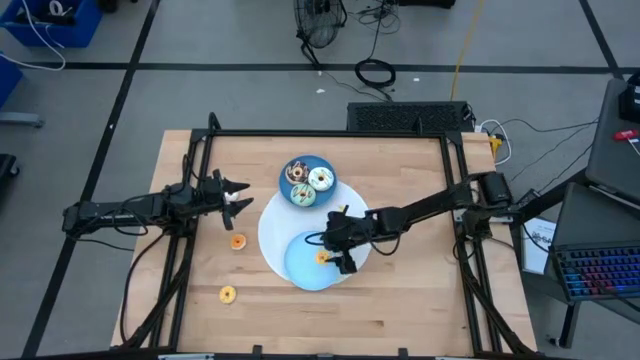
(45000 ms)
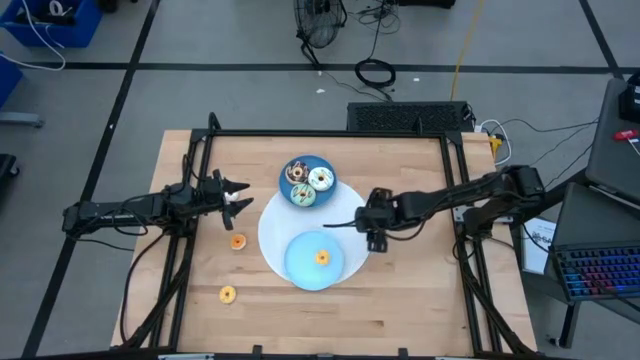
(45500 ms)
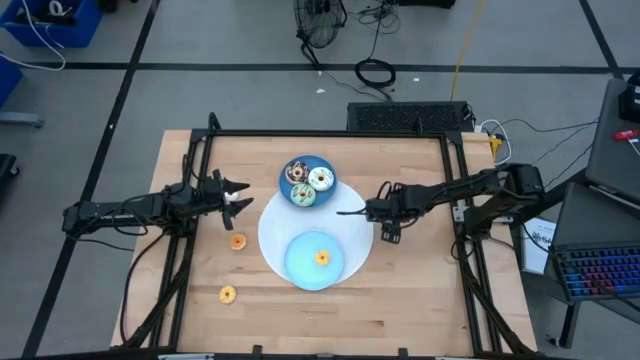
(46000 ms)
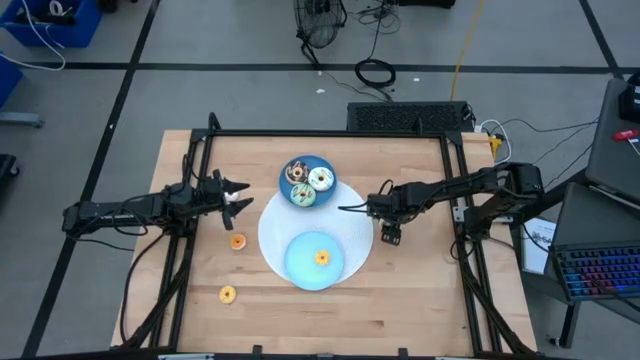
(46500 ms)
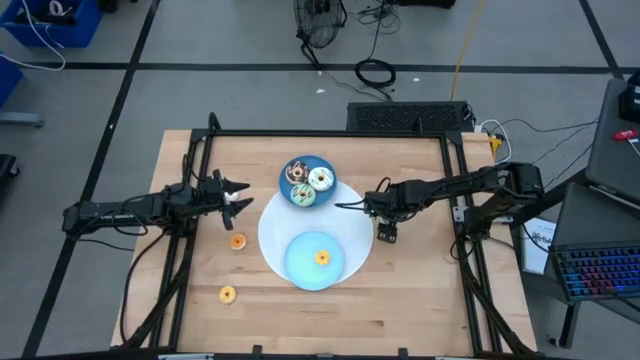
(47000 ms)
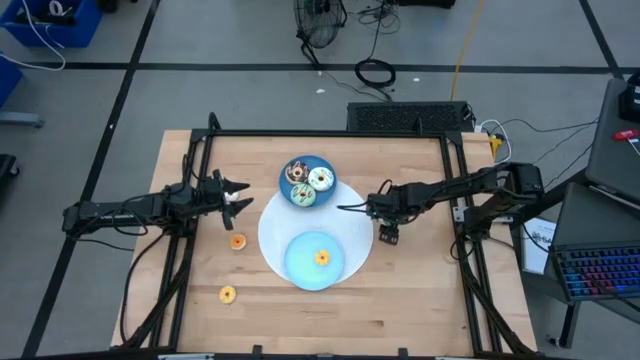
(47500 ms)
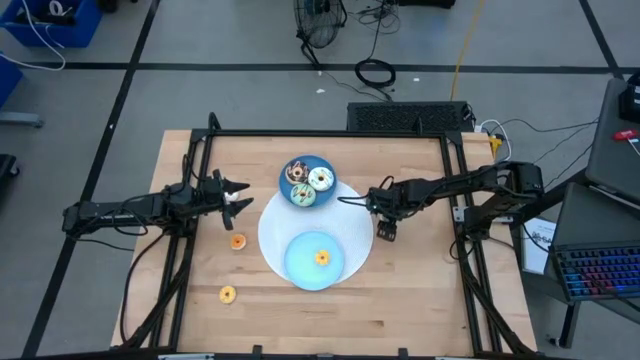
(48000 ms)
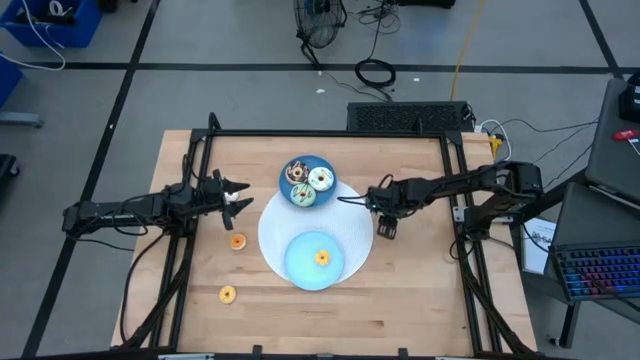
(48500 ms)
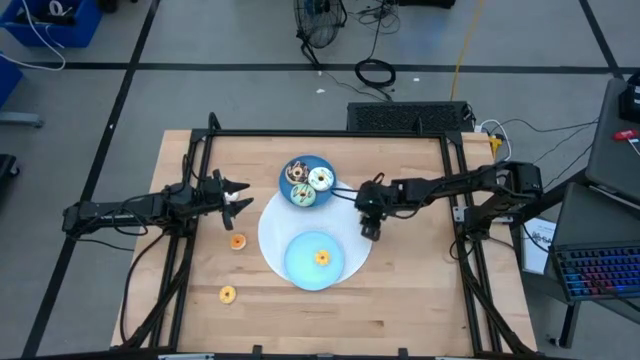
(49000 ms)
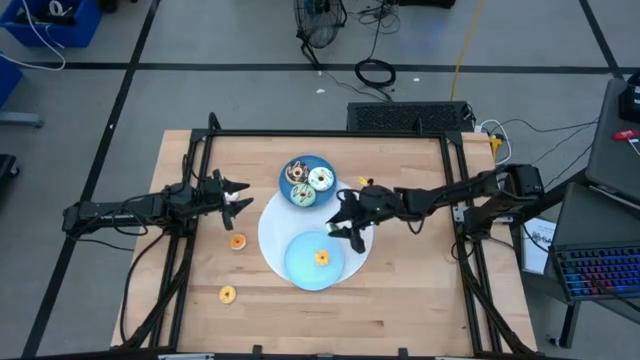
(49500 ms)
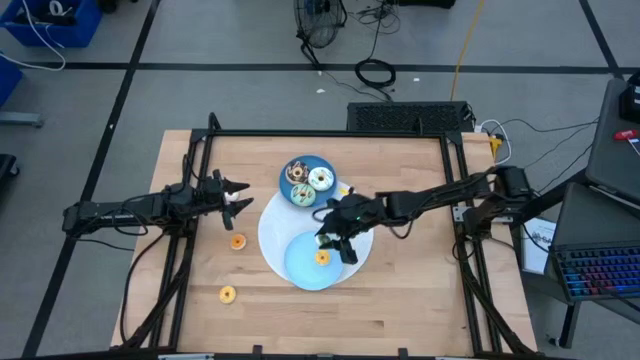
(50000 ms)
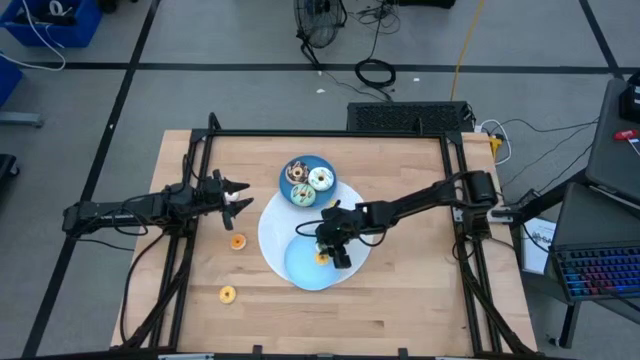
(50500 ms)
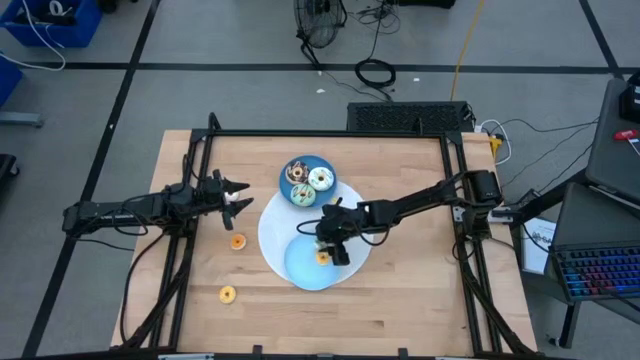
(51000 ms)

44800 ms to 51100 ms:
Task: Pick & Place donuts
Put the small green donut on the light blue plate

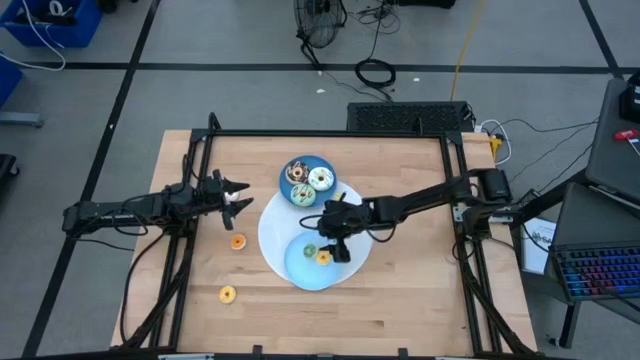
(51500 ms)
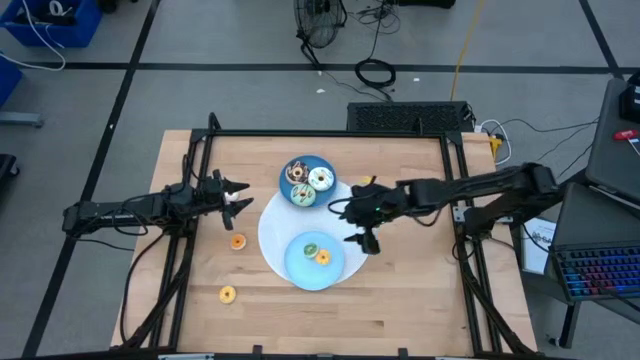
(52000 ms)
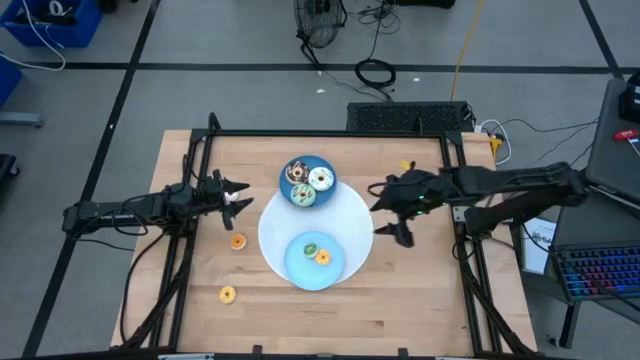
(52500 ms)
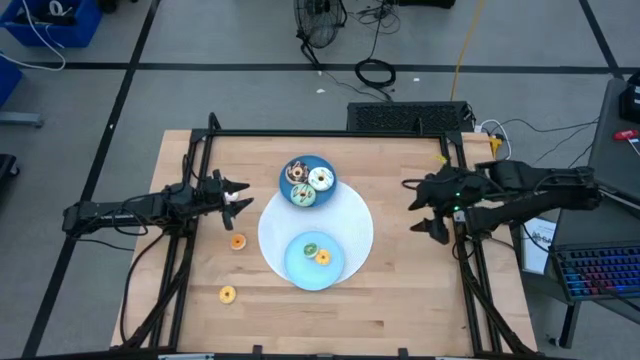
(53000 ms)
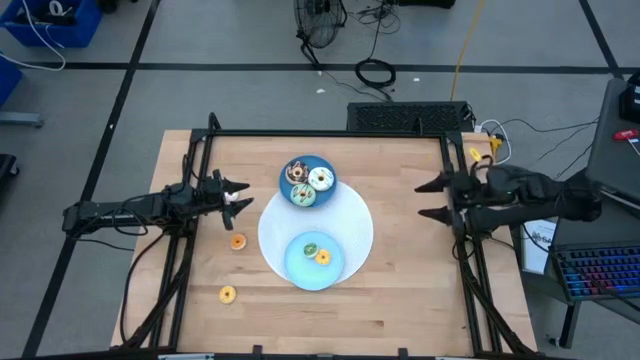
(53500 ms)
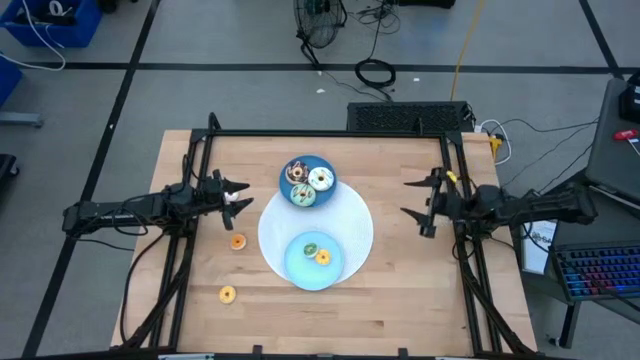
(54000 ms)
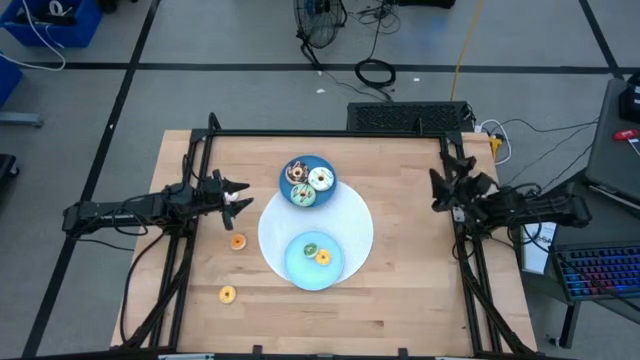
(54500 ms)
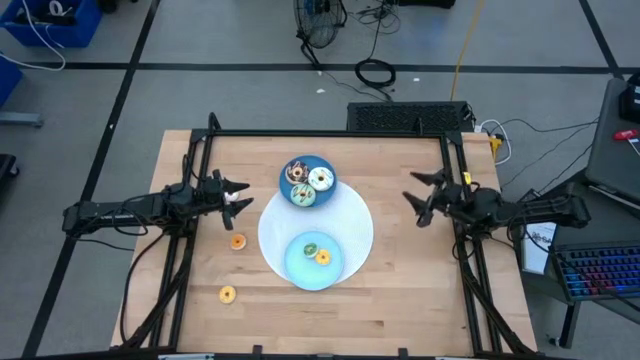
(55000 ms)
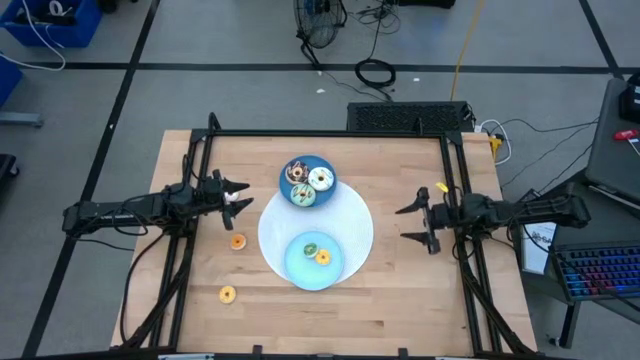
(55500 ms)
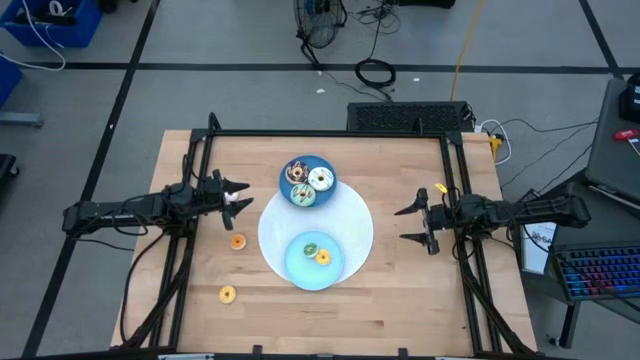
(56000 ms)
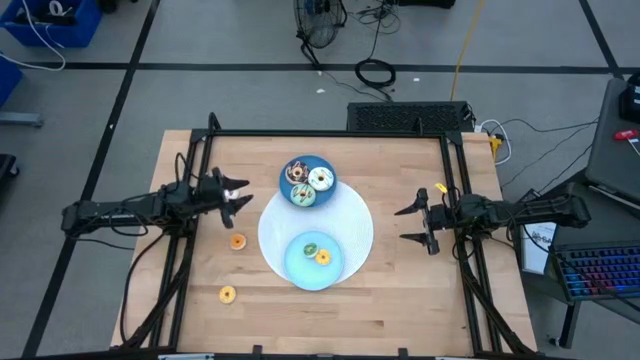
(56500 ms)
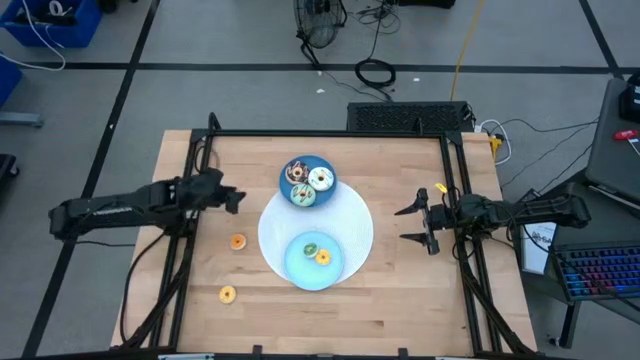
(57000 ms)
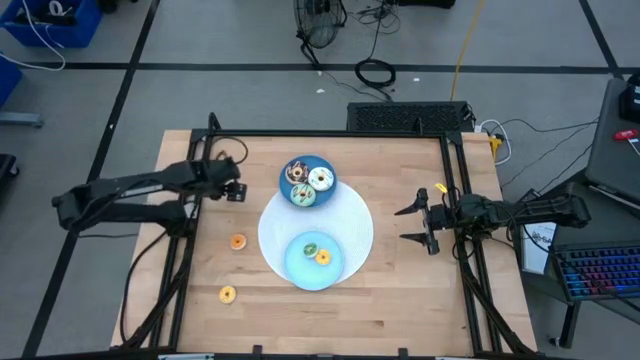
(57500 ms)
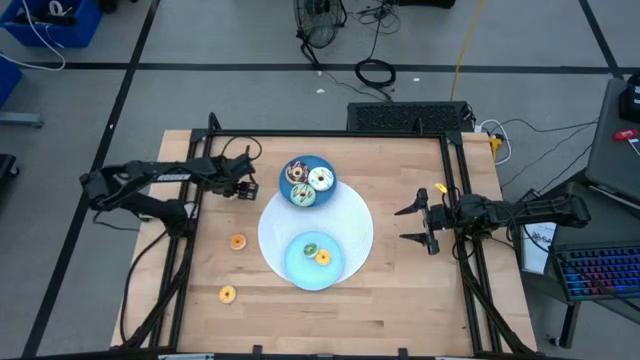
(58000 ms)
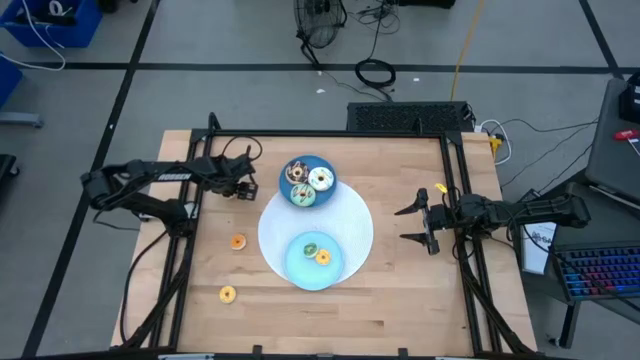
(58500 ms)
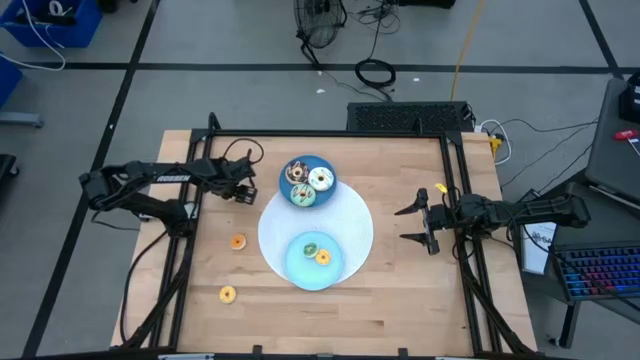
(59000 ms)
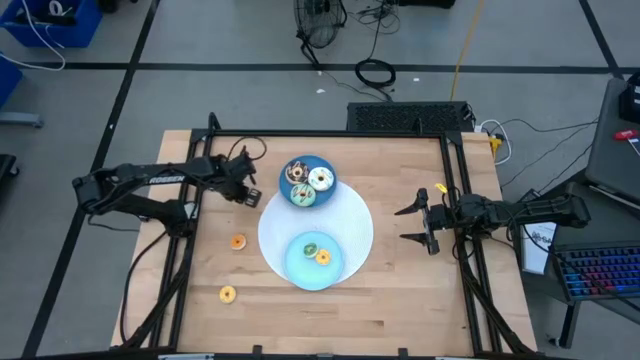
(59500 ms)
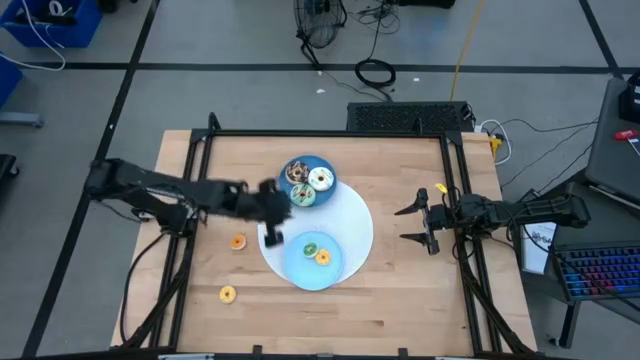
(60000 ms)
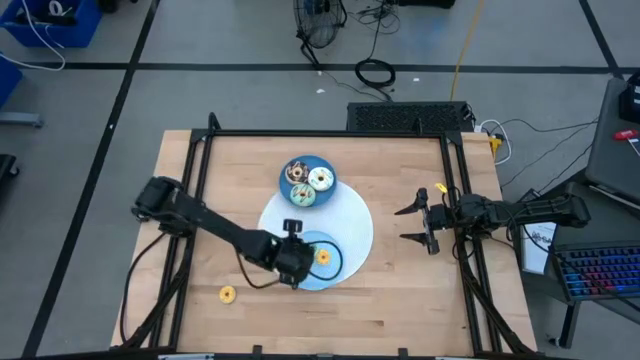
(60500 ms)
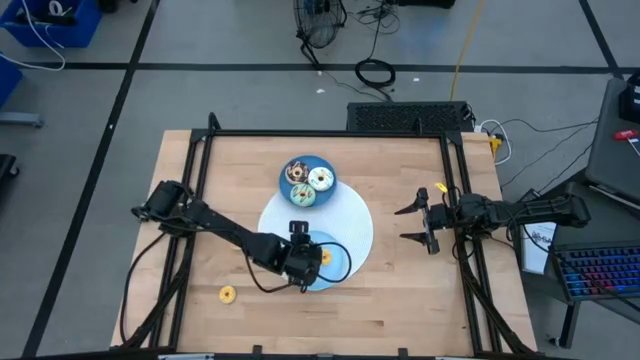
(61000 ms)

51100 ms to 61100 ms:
Put the small white donut on the light blue plate

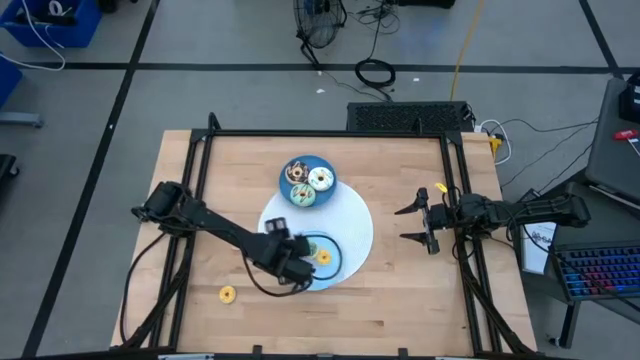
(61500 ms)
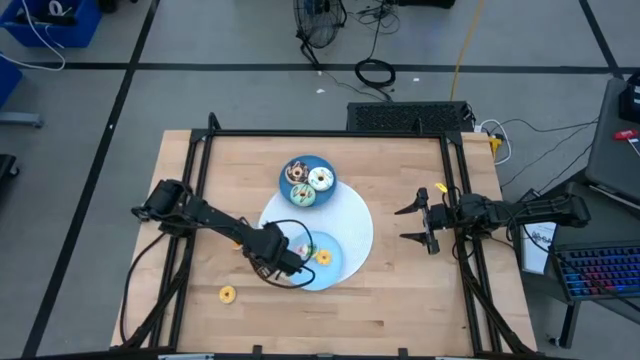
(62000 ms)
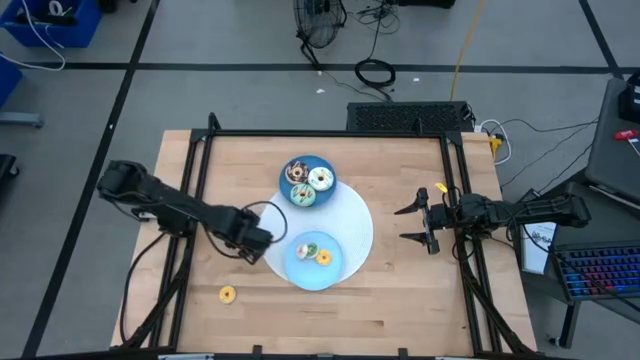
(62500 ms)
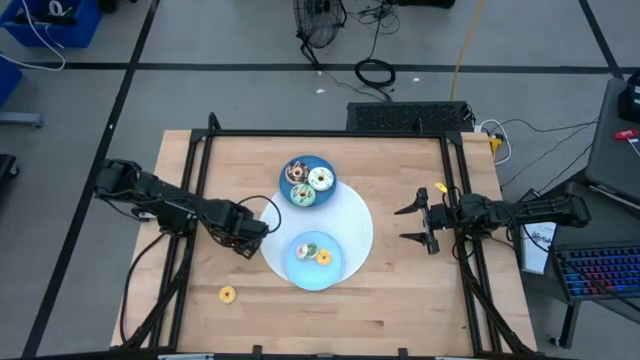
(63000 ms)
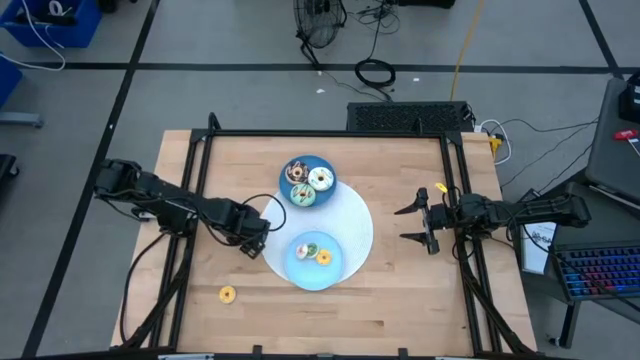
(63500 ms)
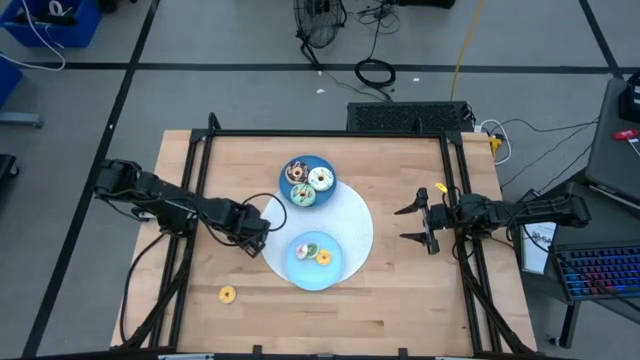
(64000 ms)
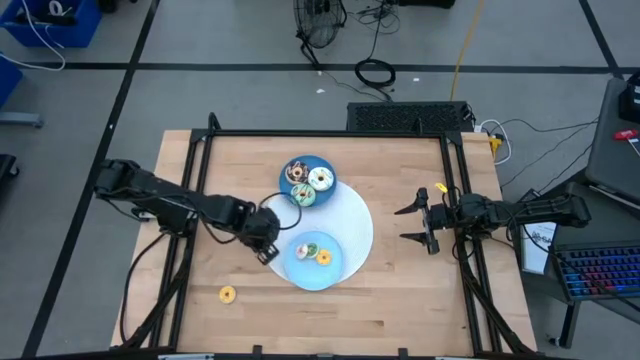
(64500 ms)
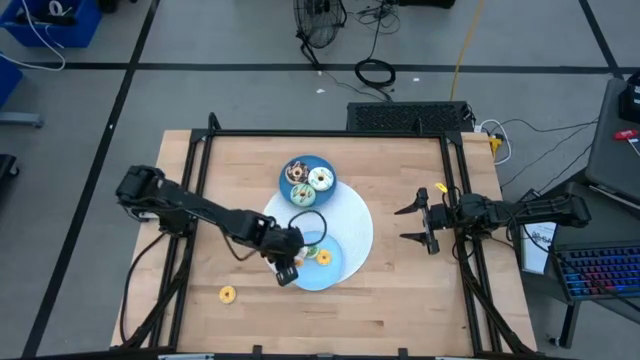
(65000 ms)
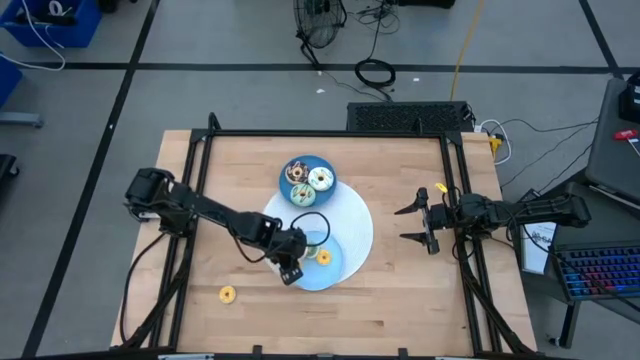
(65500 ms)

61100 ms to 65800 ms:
Put the small orange donut on the light blue plate
